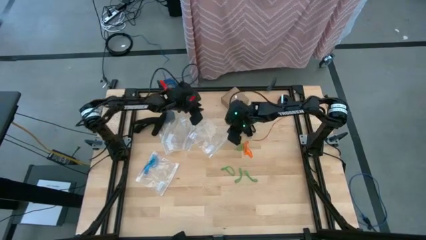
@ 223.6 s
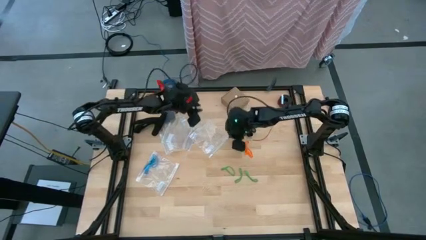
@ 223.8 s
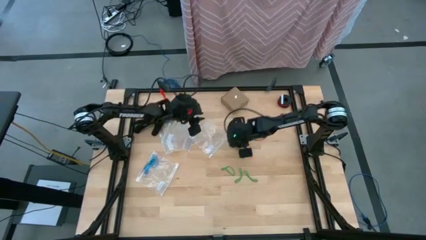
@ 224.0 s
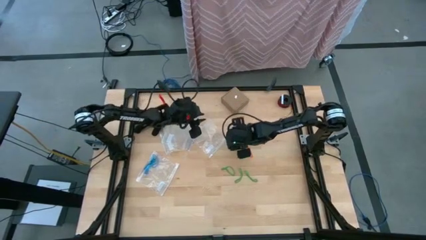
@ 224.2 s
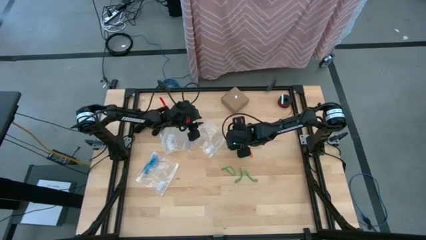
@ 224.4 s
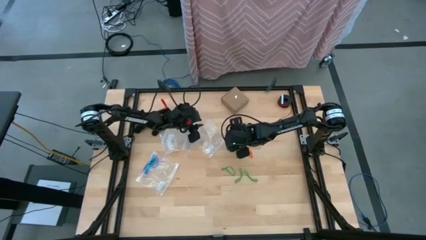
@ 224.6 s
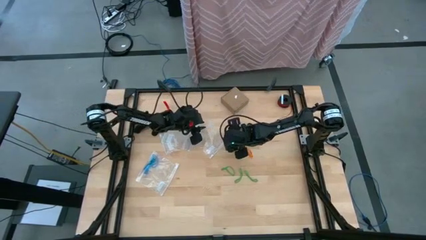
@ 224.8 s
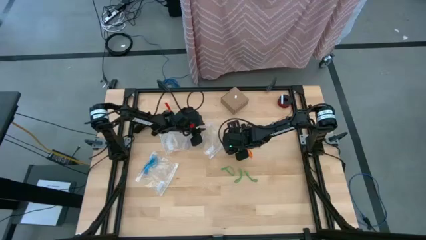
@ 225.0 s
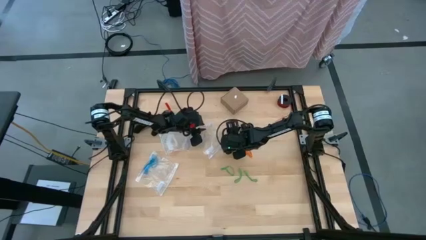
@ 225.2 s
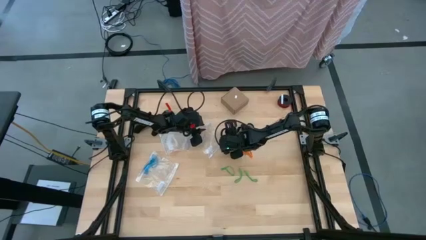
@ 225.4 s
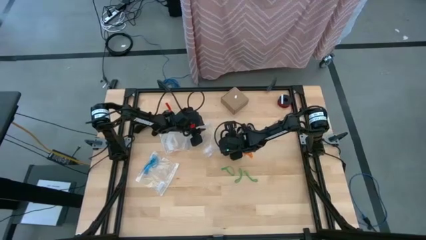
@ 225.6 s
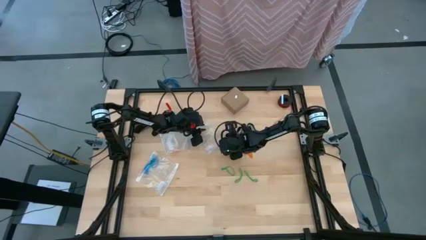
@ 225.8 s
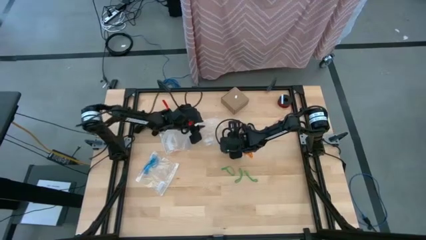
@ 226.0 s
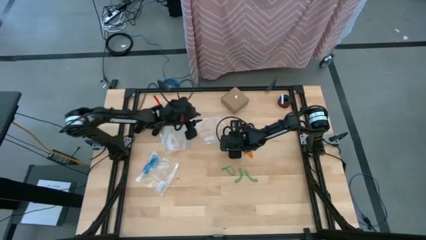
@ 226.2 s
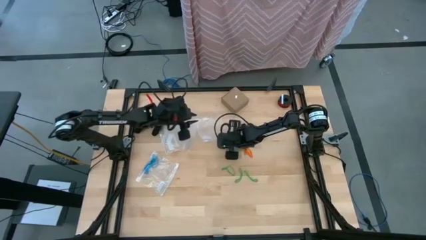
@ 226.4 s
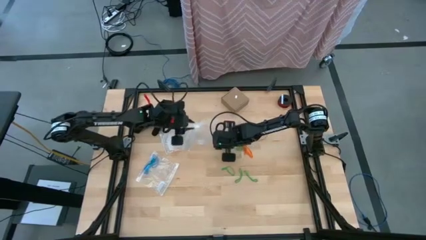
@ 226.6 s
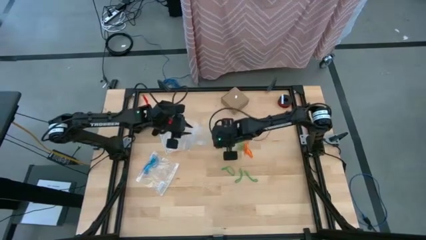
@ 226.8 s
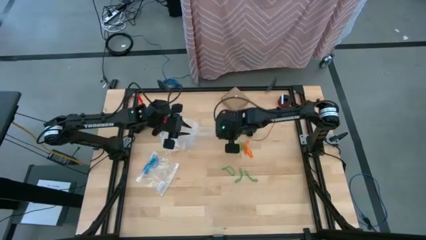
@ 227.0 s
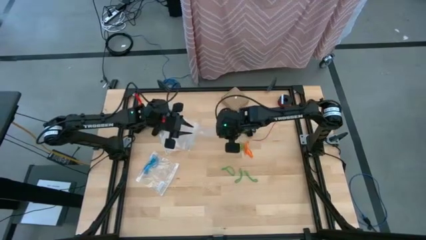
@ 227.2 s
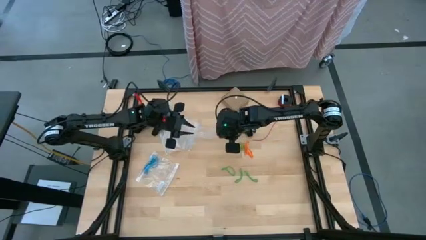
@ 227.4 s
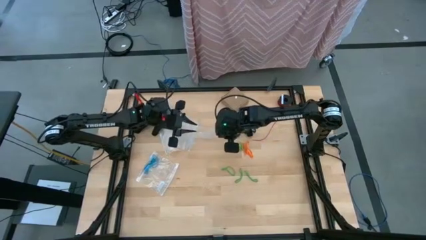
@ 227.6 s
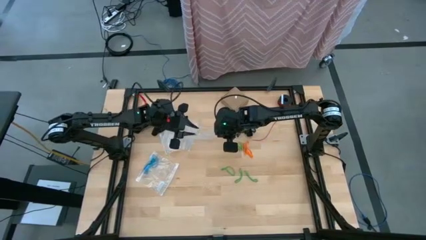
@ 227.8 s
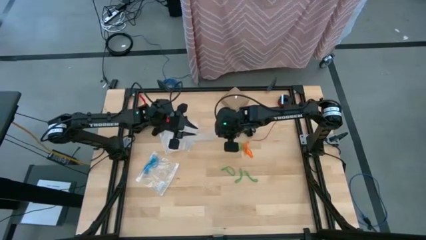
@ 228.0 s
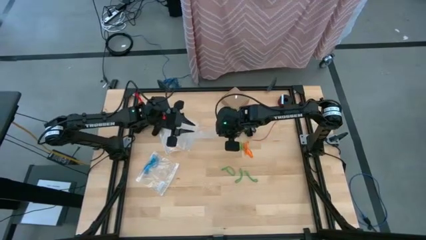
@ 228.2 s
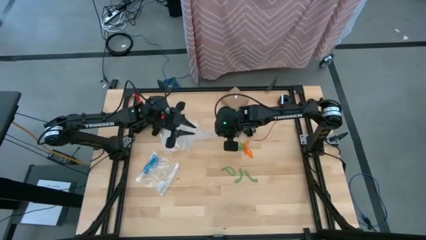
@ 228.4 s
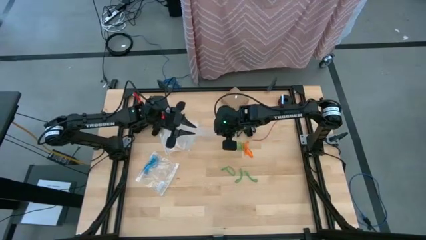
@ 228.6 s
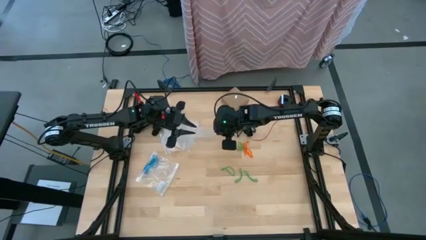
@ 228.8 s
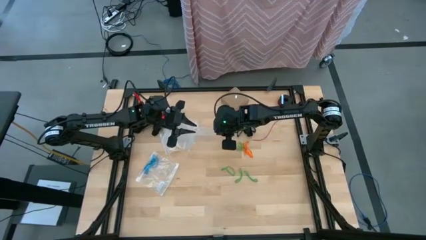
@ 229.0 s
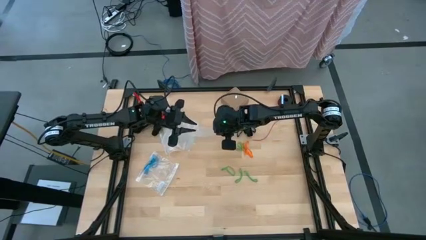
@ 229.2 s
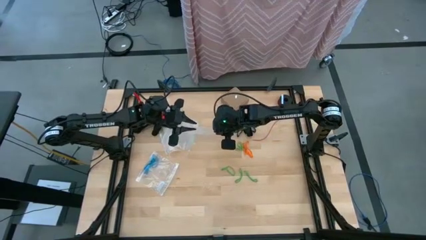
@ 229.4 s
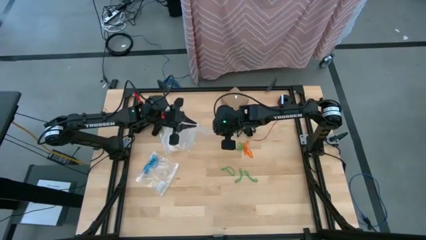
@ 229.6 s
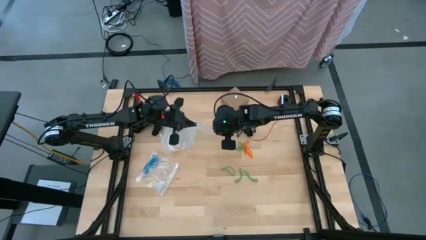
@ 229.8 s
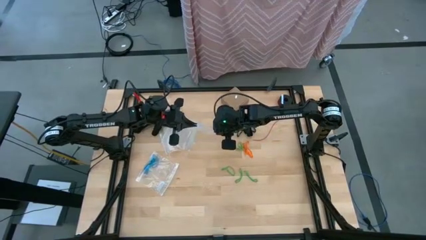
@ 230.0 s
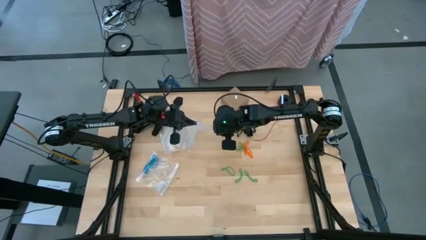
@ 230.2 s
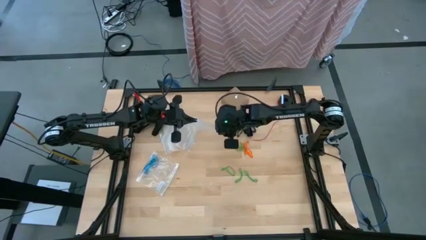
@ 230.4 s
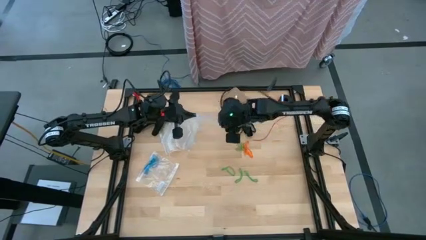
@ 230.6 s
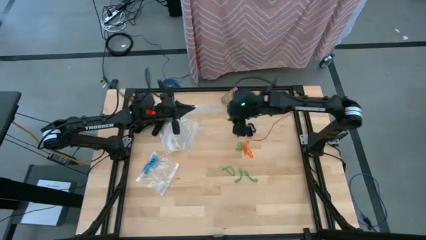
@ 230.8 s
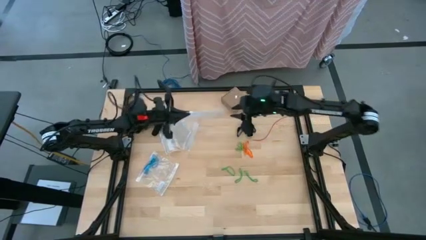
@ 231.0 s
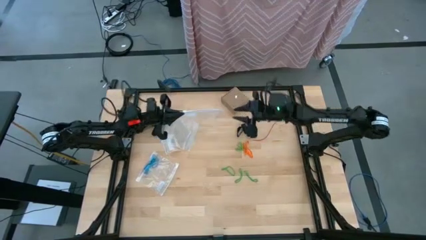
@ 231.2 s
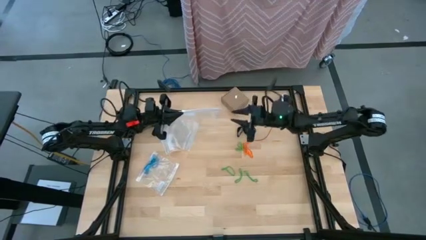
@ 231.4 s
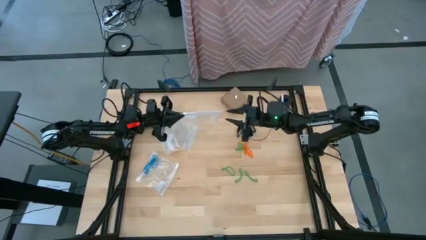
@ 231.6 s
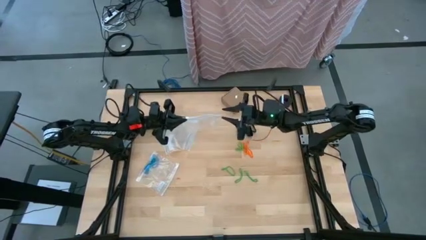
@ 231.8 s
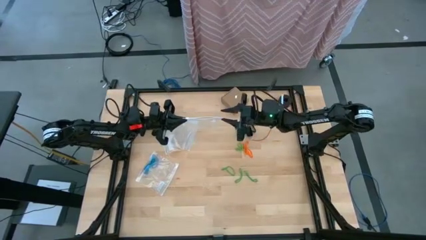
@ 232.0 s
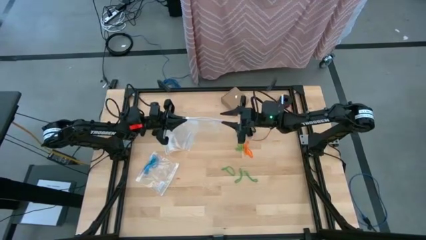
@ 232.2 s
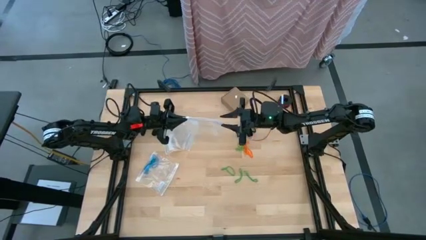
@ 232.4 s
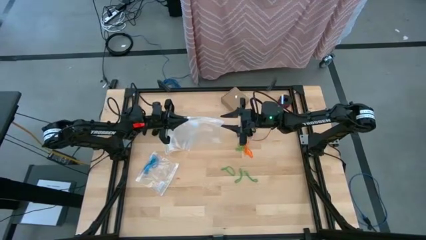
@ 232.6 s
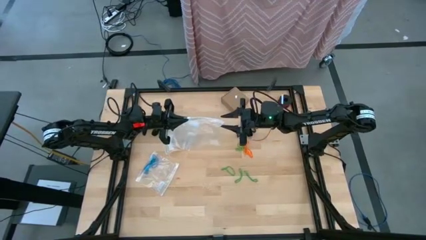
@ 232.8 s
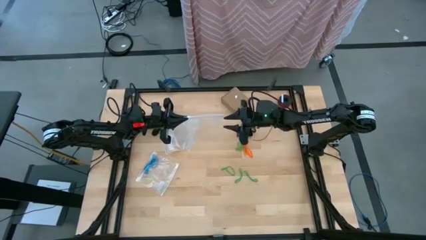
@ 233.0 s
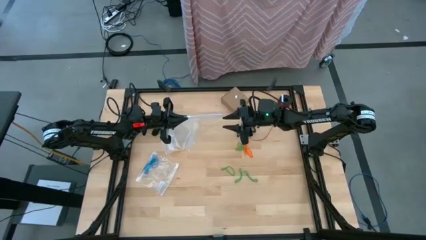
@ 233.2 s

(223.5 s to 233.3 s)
Task: Sort rubber bands
Open the transparent zip bag

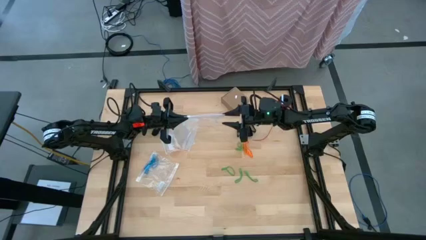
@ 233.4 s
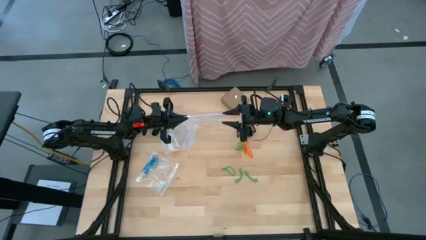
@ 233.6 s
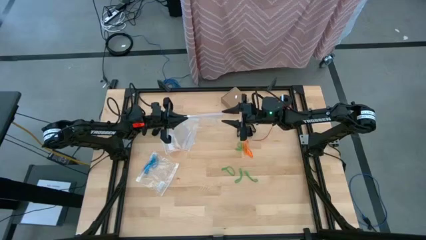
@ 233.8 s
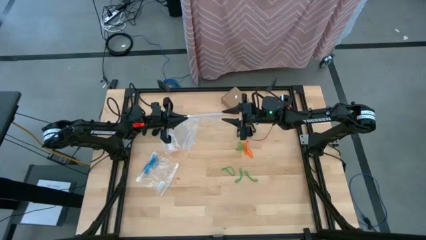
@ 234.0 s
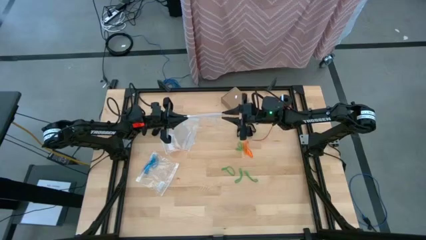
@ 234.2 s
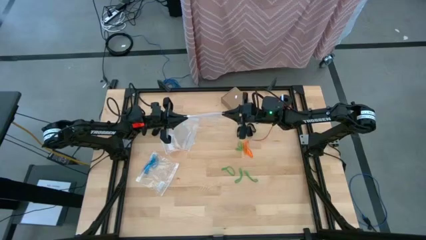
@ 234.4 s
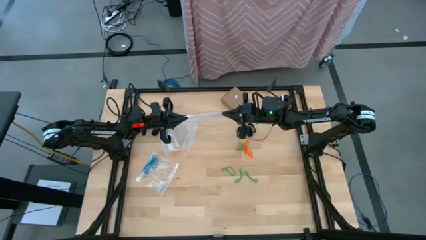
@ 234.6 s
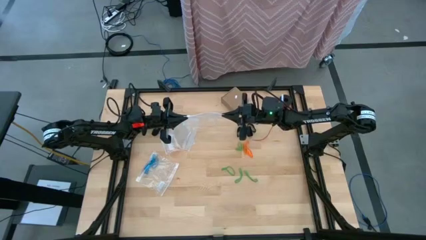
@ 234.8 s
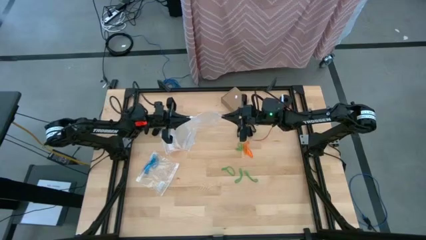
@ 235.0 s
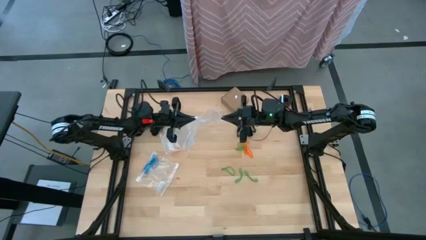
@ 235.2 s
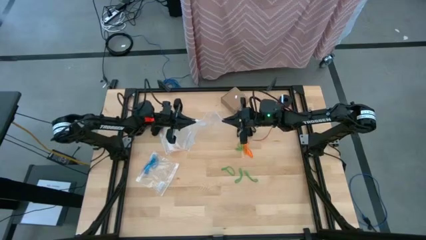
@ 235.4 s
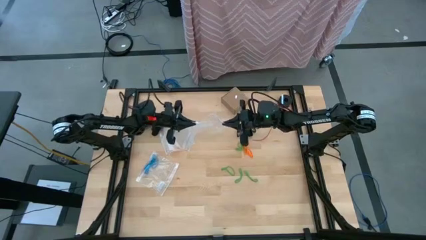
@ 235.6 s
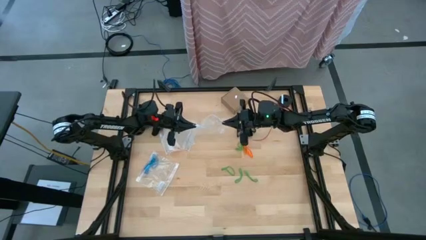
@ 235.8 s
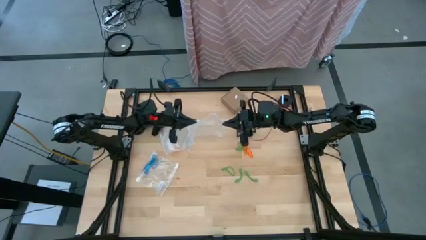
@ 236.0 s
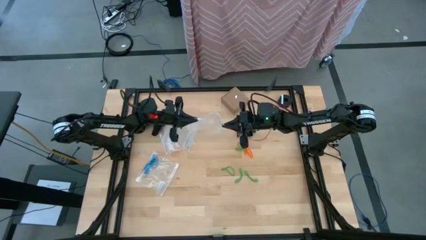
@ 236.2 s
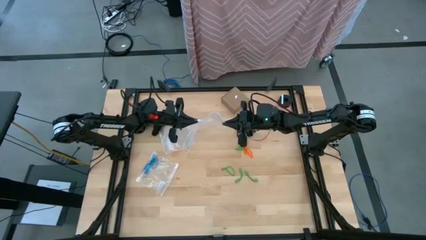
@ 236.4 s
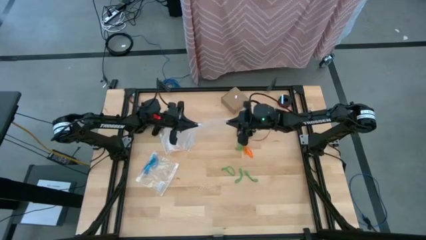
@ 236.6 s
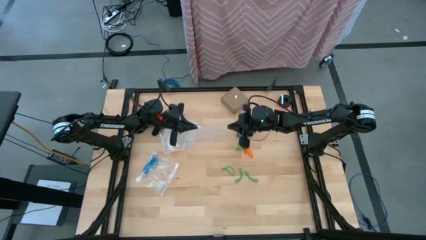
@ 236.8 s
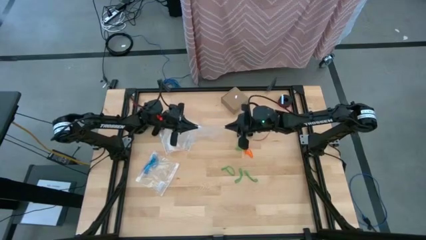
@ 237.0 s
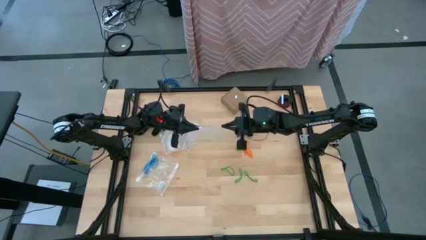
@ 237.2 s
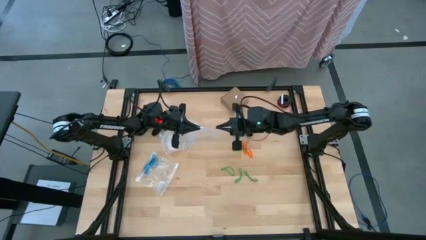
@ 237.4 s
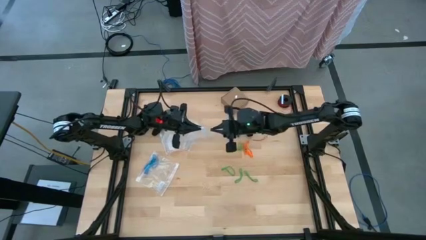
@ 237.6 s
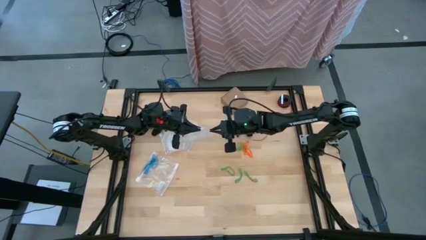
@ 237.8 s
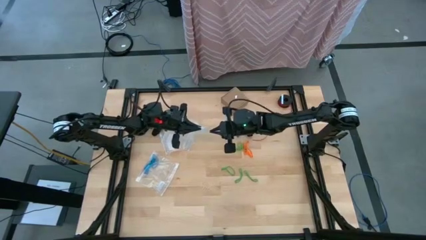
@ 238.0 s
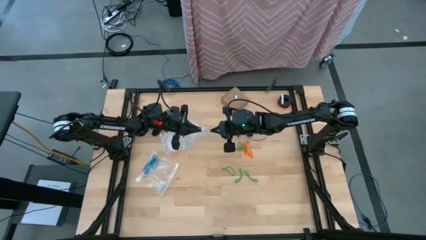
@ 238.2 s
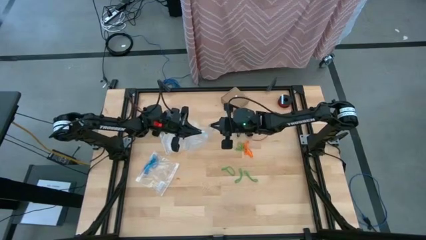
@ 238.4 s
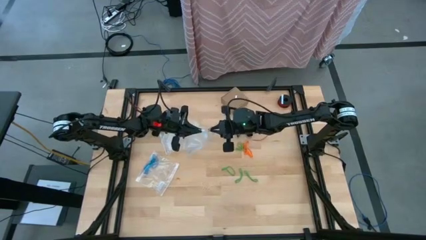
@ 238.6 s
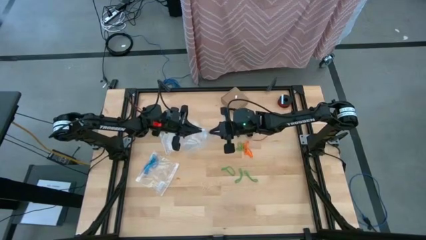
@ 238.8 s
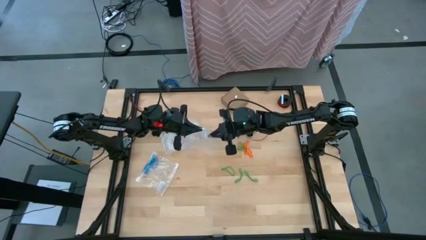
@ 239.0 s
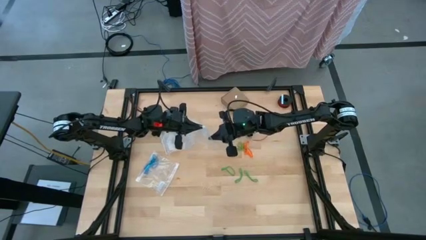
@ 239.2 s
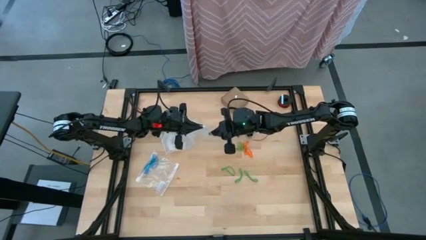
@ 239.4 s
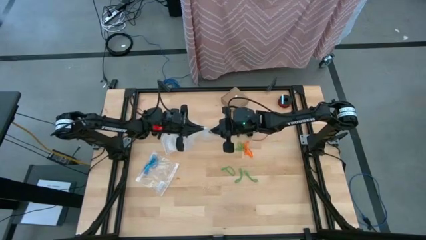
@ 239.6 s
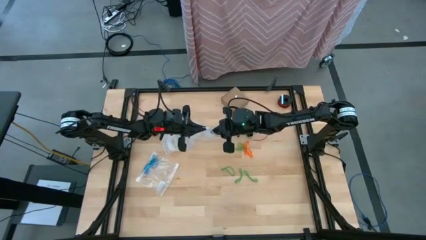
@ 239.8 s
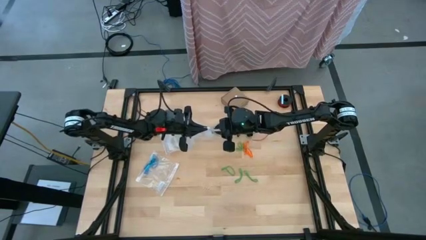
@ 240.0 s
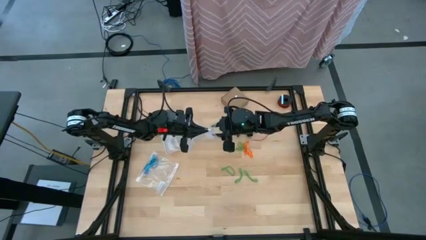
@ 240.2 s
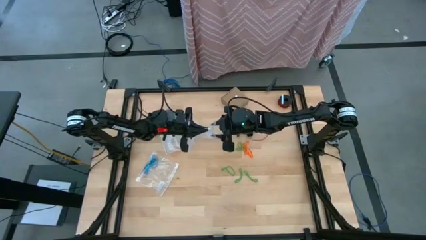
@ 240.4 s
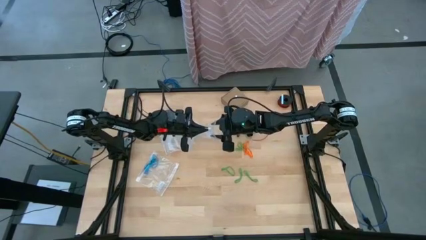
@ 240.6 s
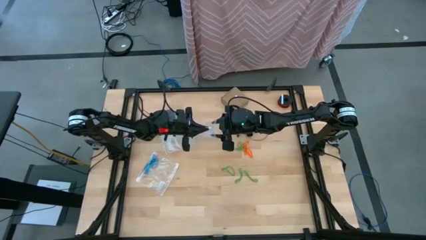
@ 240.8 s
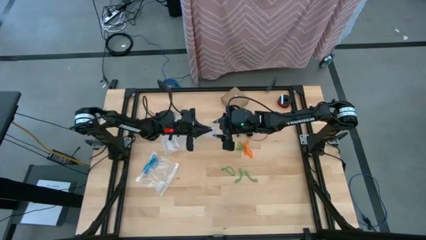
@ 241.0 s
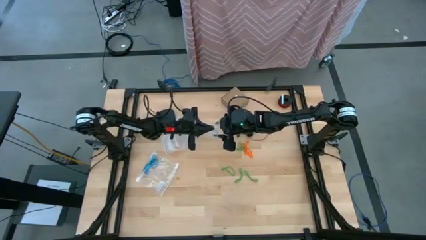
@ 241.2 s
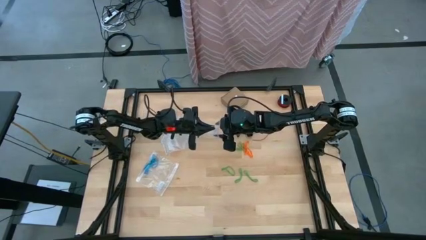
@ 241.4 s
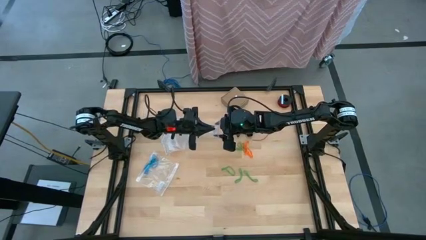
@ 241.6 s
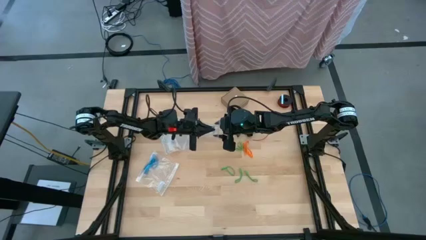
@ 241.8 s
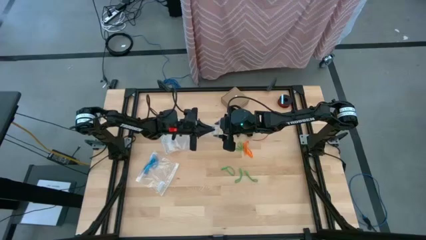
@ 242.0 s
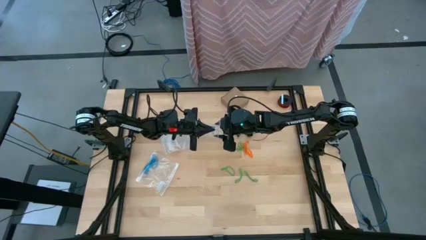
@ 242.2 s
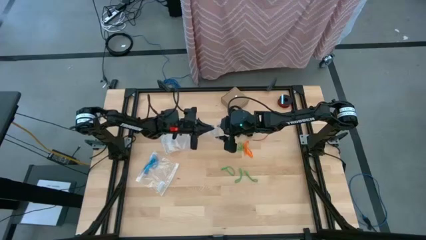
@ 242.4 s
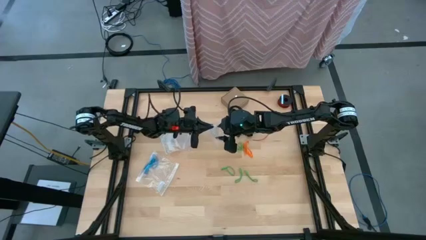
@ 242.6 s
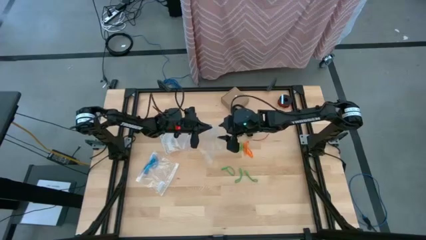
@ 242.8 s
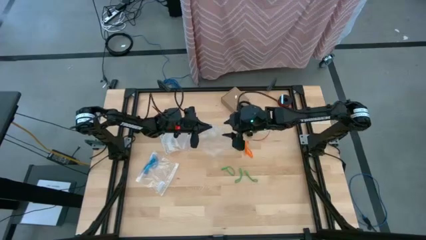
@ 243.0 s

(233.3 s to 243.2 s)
Open the transparent zip bag
